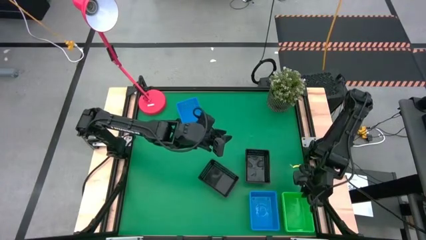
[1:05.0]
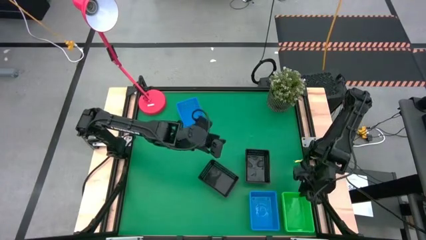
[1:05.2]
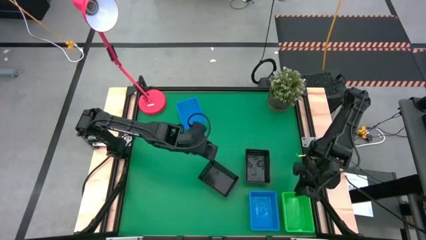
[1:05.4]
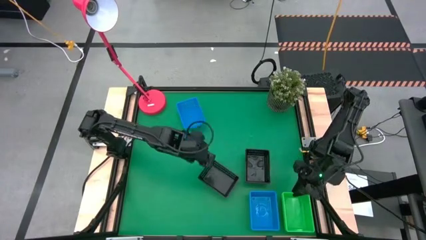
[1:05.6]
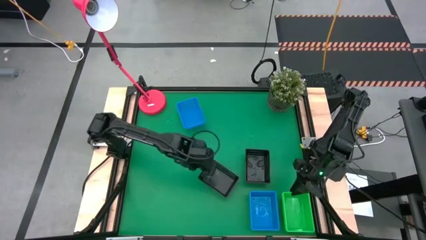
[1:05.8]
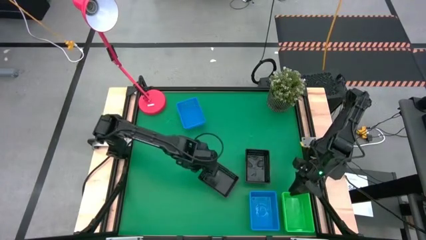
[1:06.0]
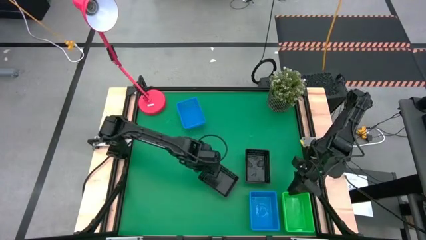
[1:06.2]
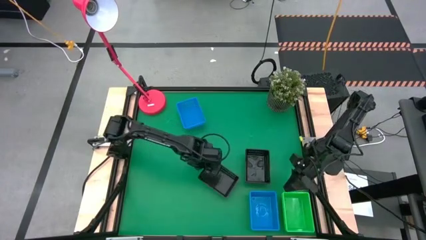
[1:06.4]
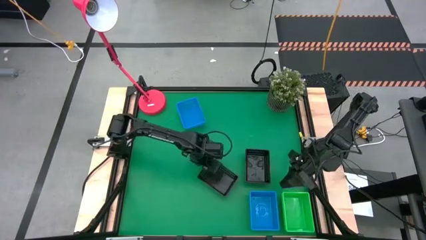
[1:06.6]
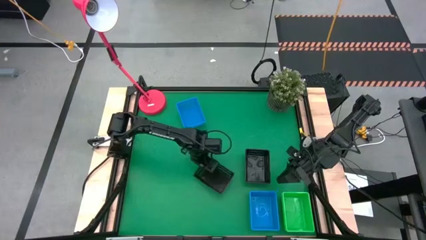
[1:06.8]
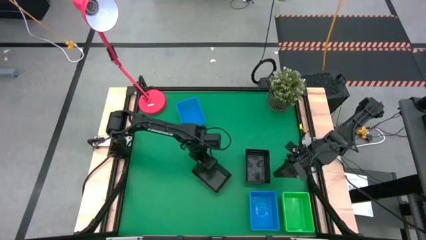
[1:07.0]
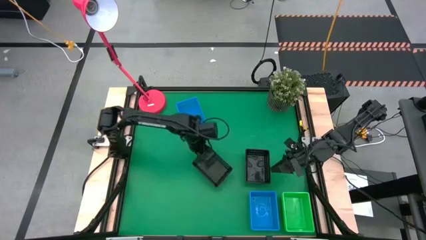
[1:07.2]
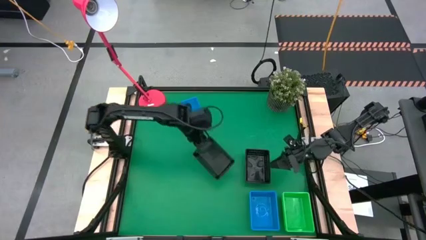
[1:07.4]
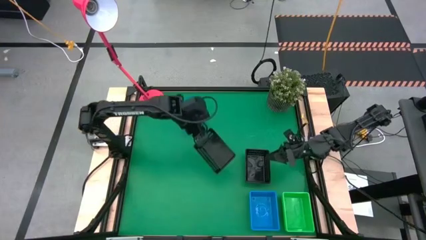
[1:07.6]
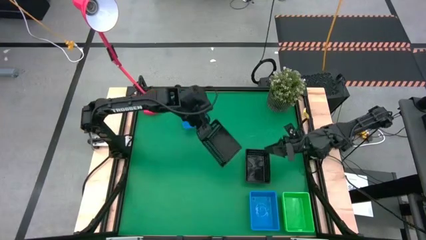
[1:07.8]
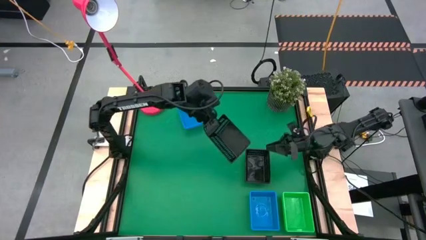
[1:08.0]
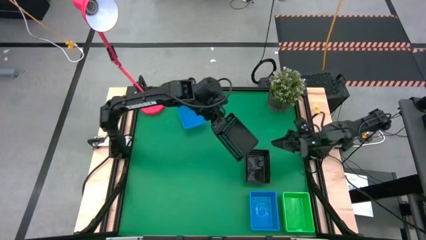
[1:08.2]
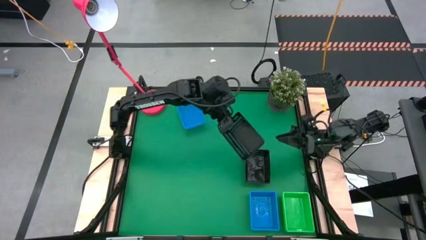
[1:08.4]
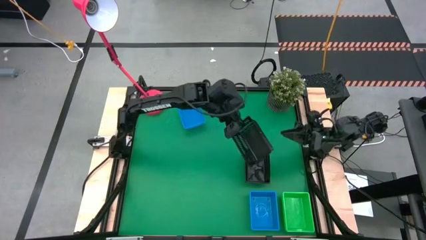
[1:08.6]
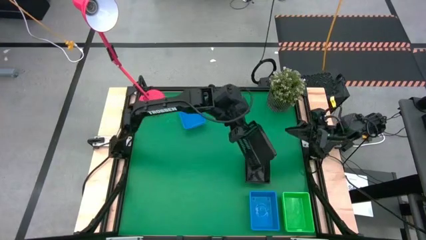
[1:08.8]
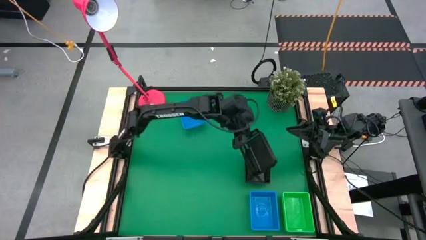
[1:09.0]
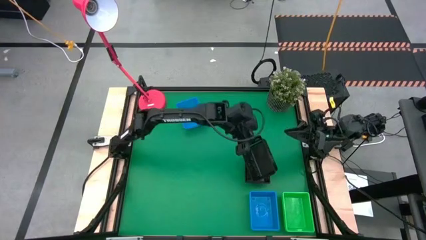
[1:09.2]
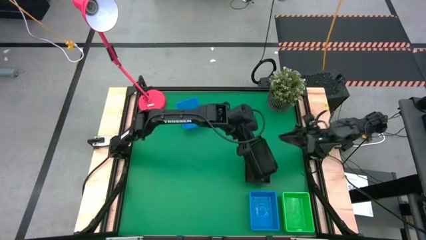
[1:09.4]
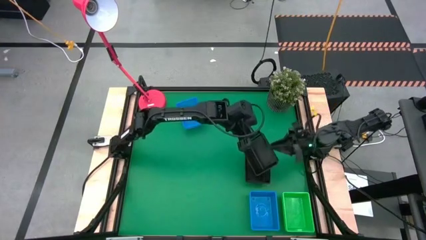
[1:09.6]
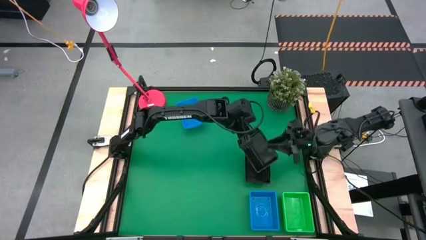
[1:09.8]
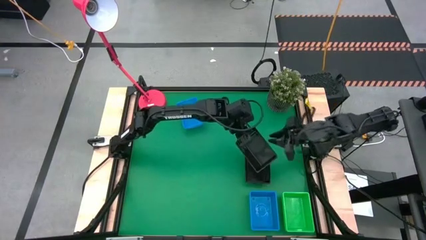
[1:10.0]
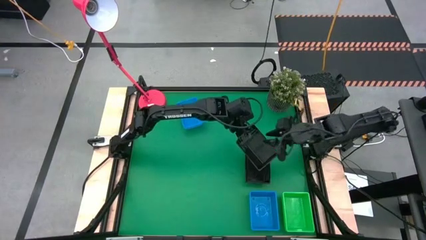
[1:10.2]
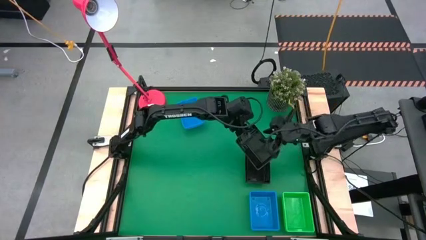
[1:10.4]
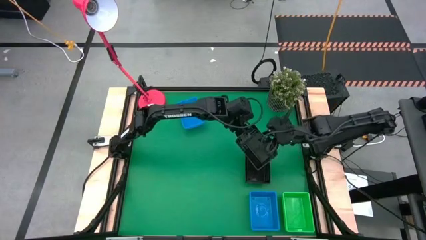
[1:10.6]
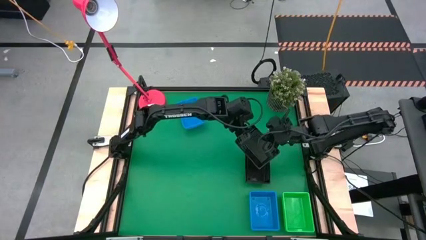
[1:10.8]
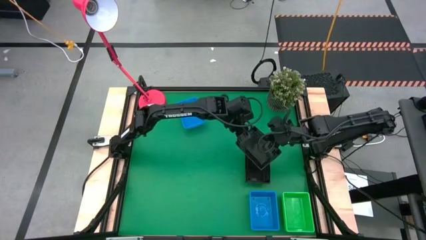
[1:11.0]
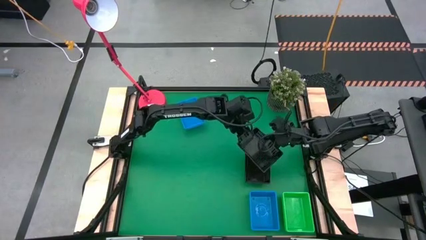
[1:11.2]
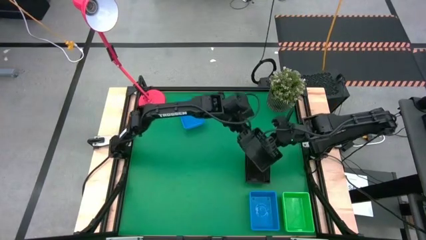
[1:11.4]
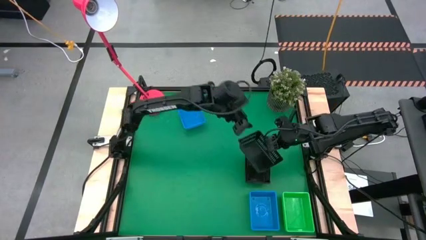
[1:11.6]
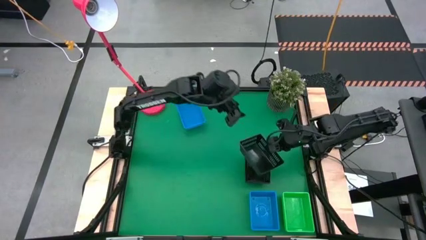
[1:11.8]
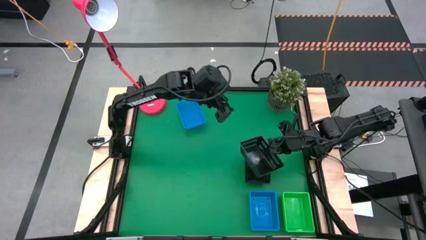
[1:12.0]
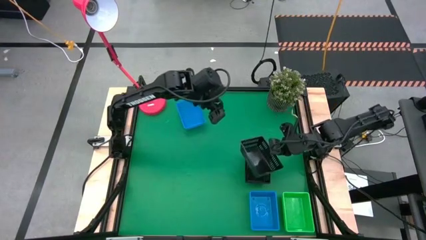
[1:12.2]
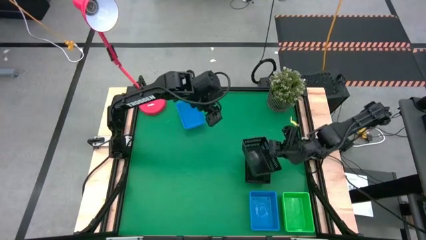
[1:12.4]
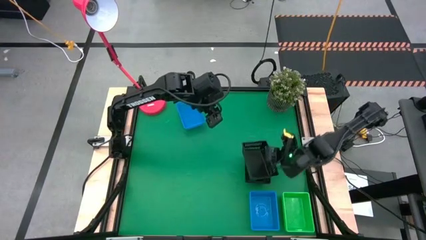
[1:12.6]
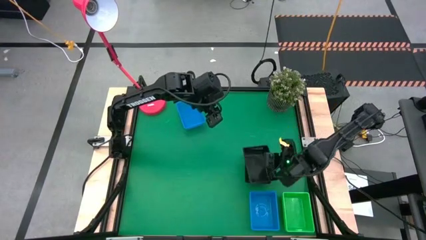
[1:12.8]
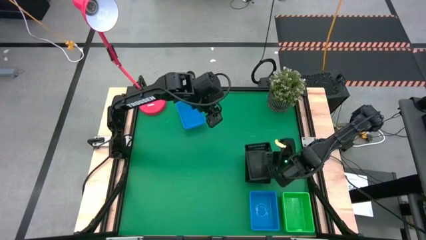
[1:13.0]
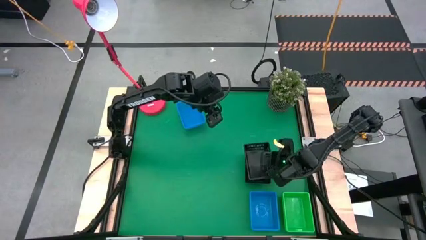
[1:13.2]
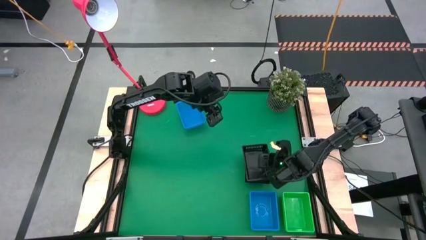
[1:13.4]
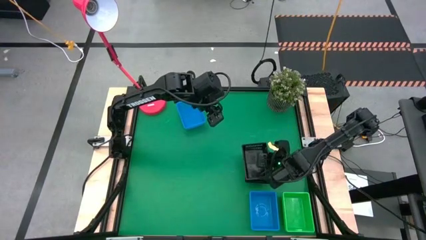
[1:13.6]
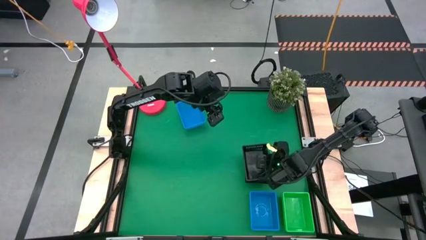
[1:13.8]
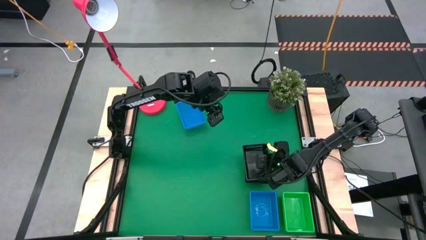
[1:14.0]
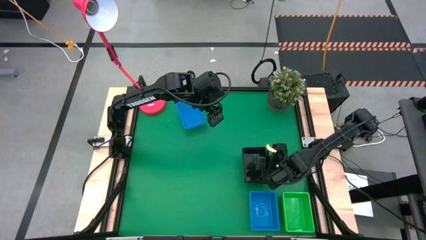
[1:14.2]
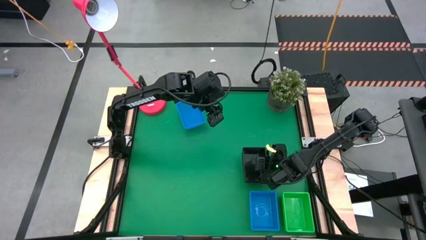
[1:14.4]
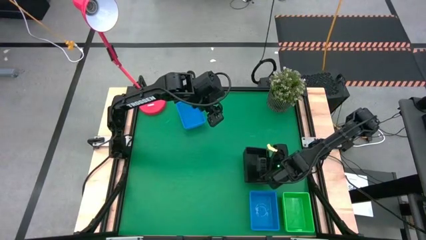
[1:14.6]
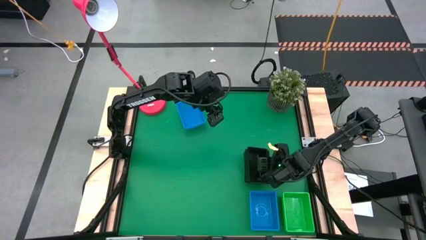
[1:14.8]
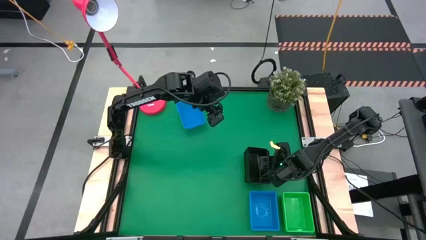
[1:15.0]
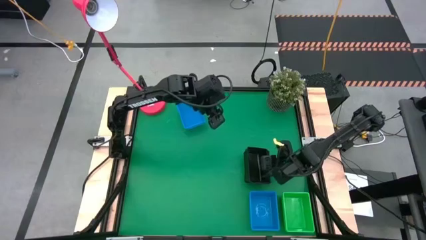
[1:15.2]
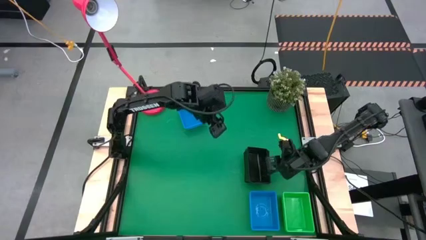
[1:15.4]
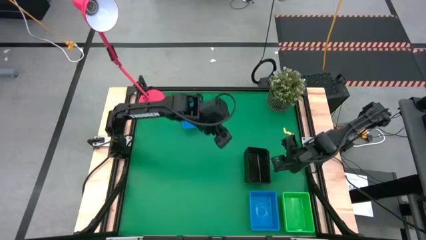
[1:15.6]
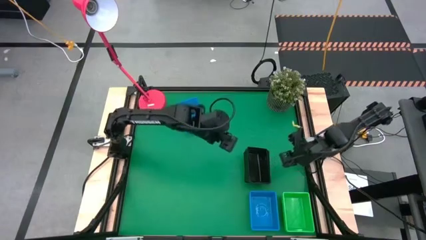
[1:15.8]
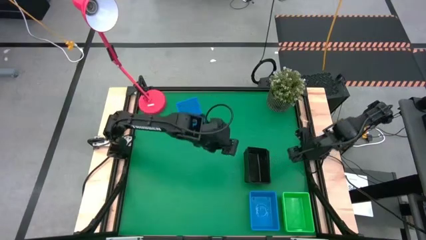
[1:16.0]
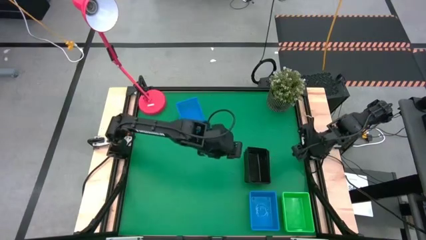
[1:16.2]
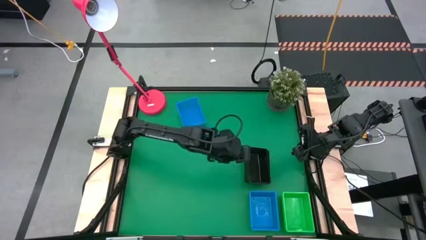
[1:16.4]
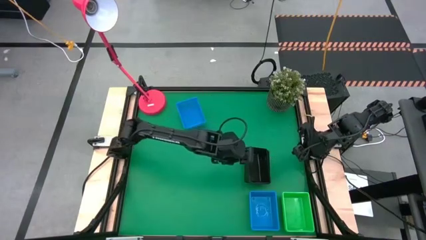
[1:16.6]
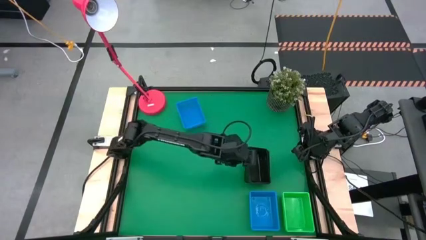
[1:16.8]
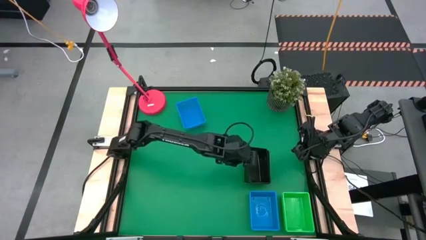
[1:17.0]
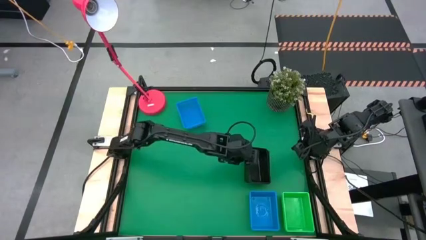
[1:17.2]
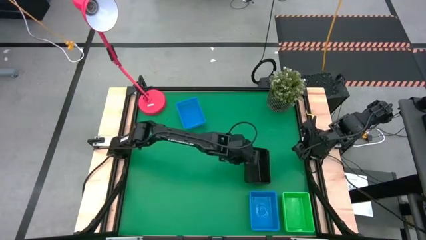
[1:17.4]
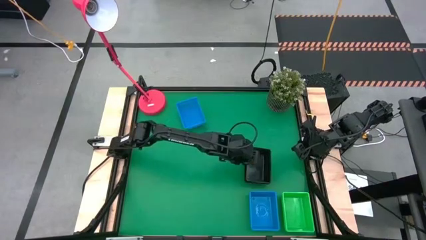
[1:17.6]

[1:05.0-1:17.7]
Stack the left black bin on the black bins
